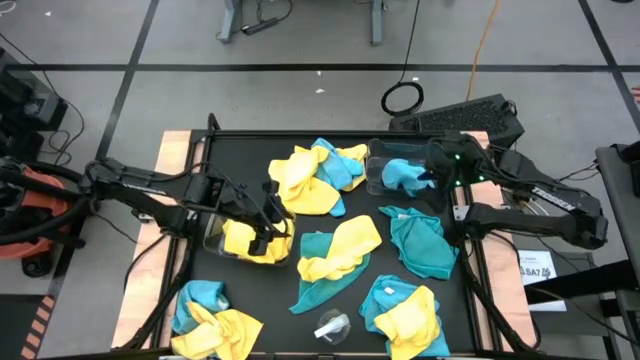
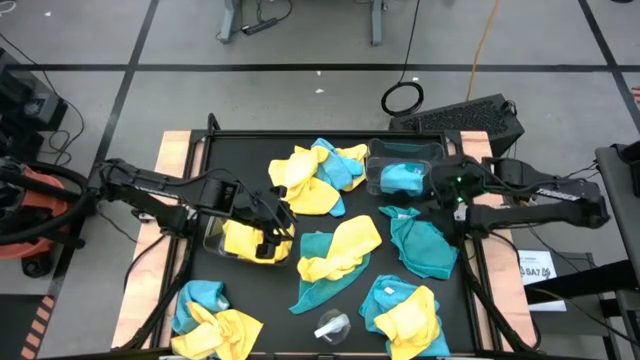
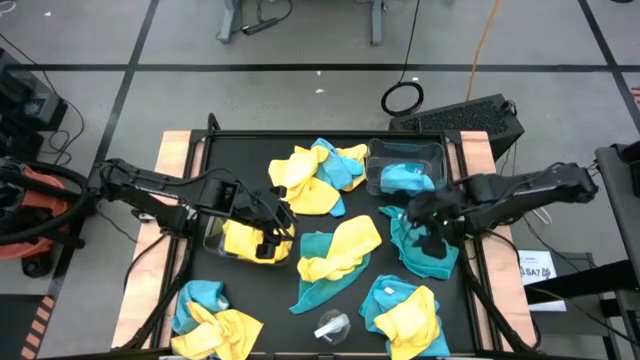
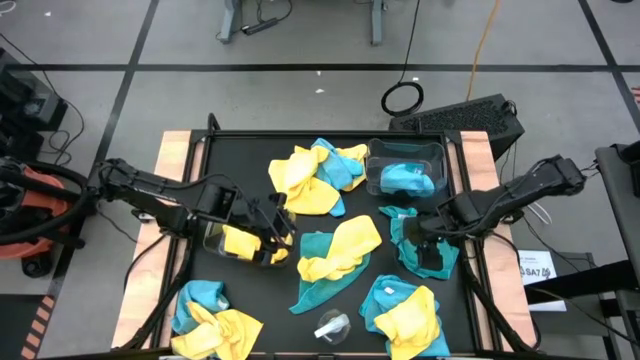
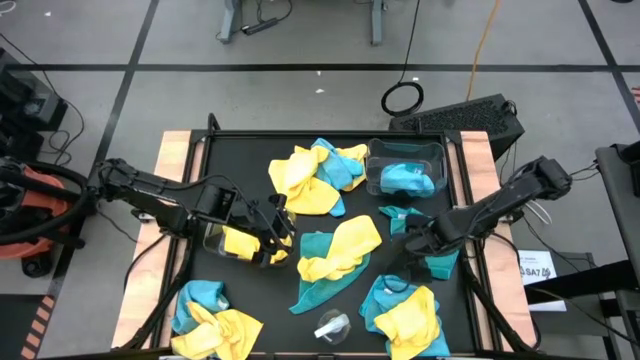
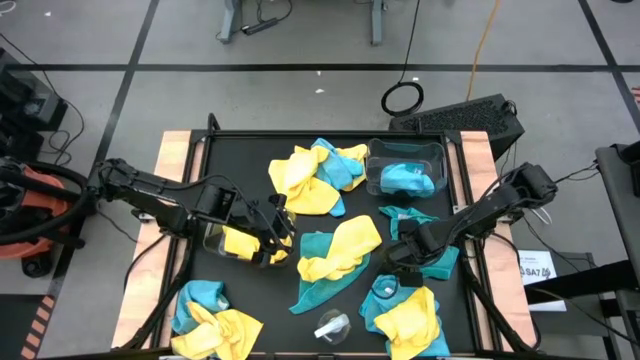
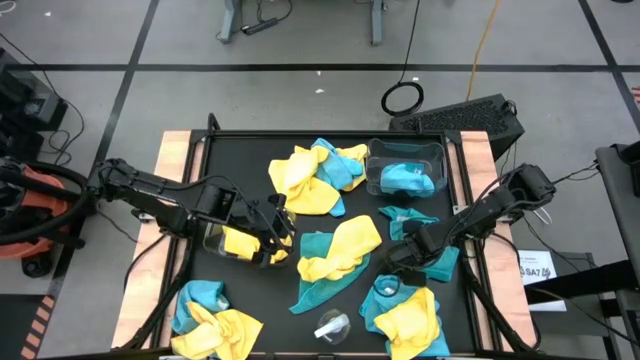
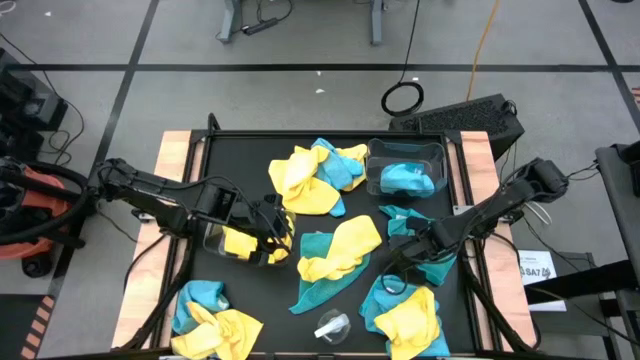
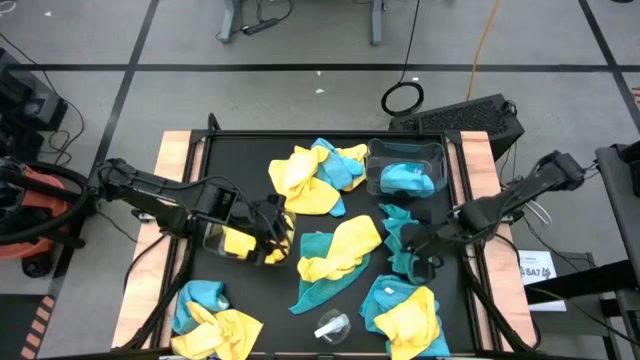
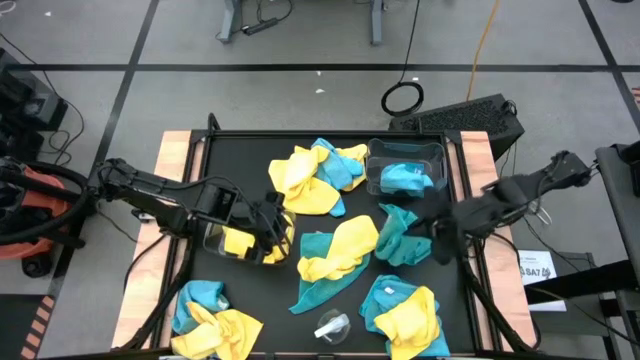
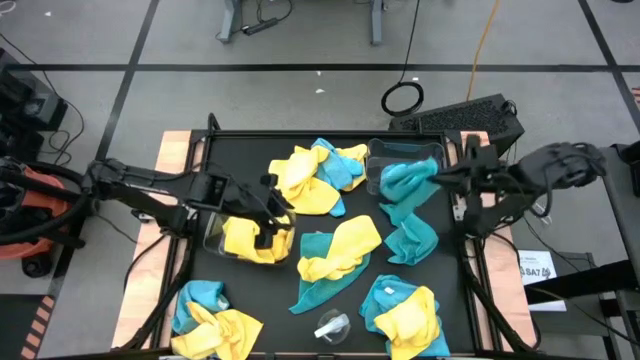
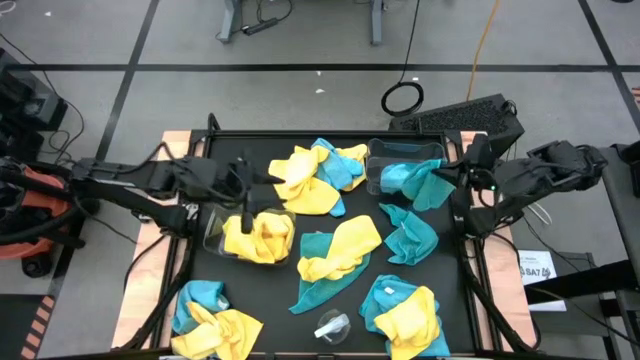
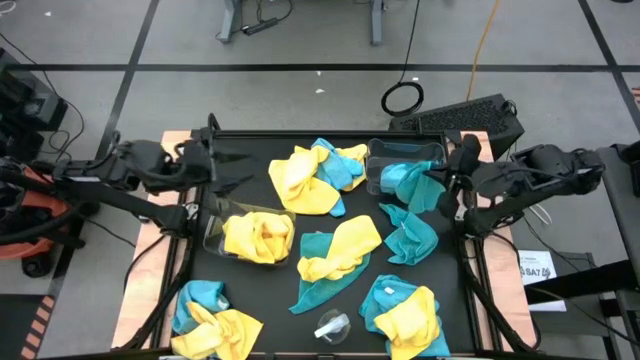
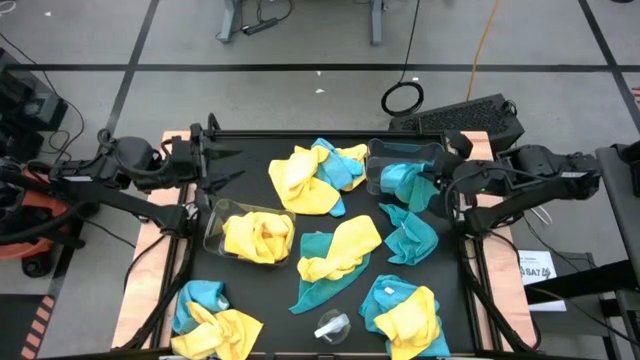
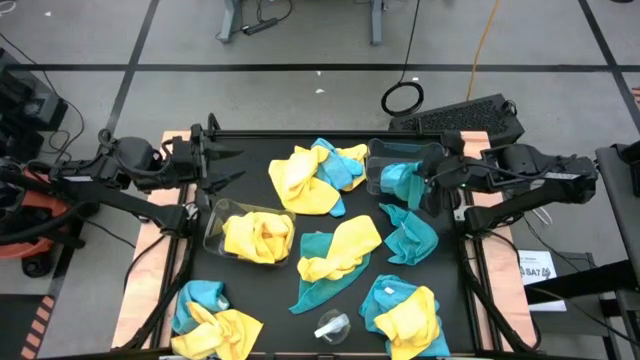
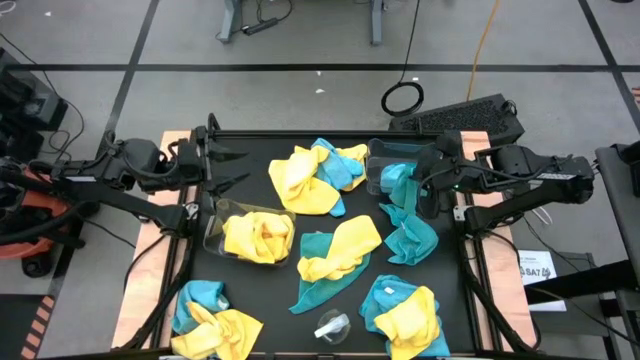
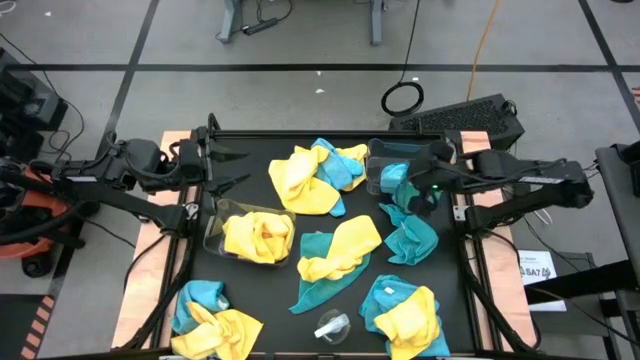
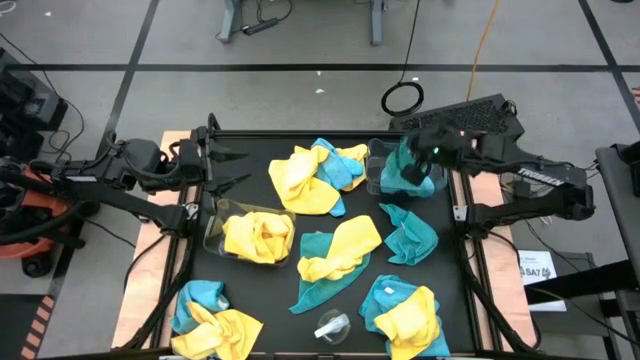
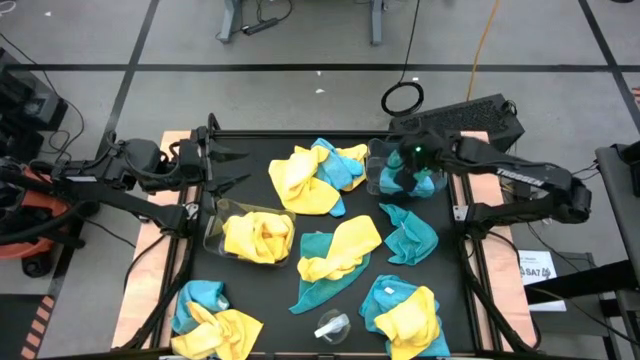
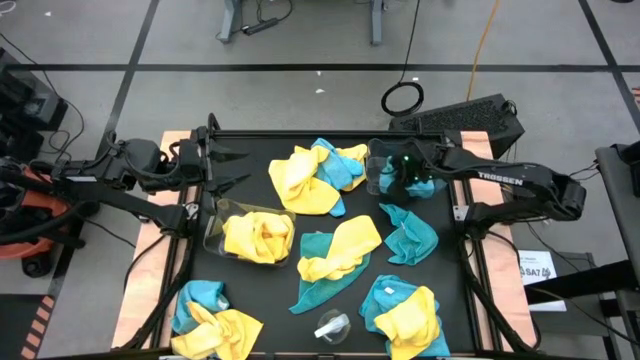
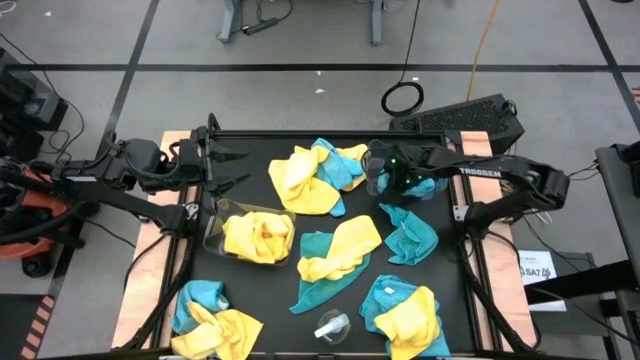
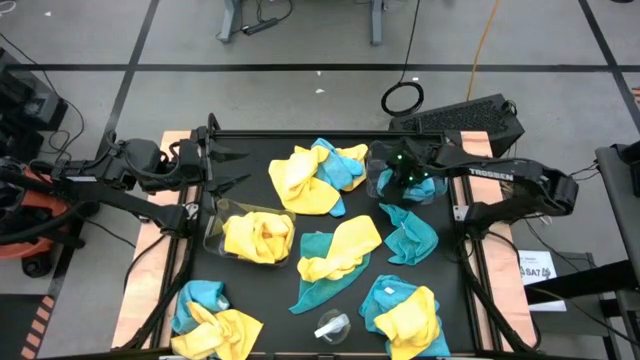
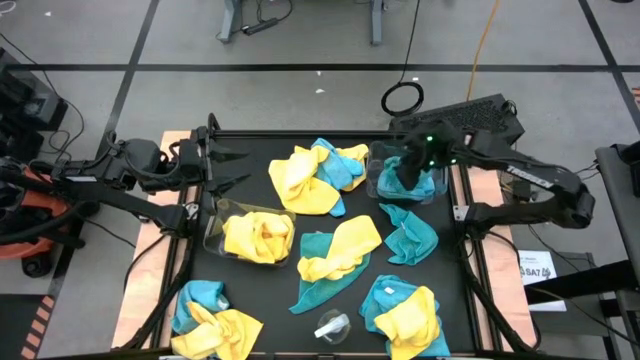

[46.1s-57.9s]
Task: Sort microfiber towel by color & place in baskets
Put the blue microfiber towel into the top transparent bin

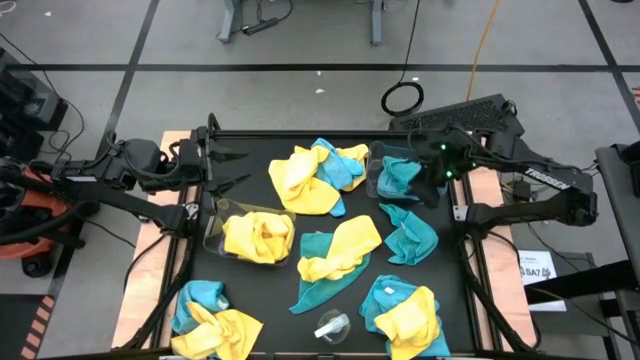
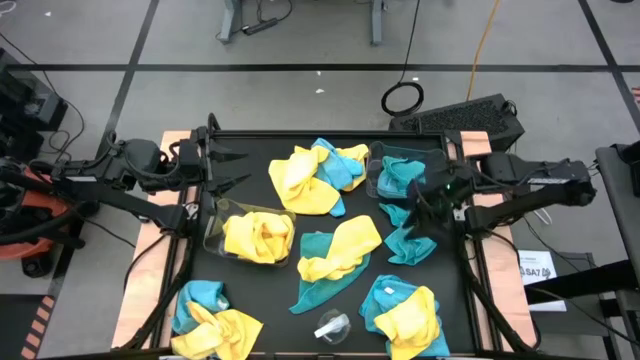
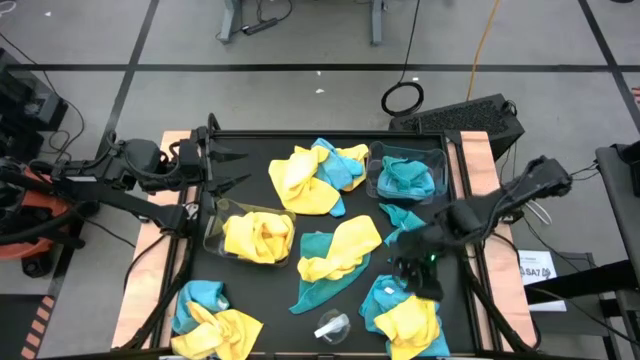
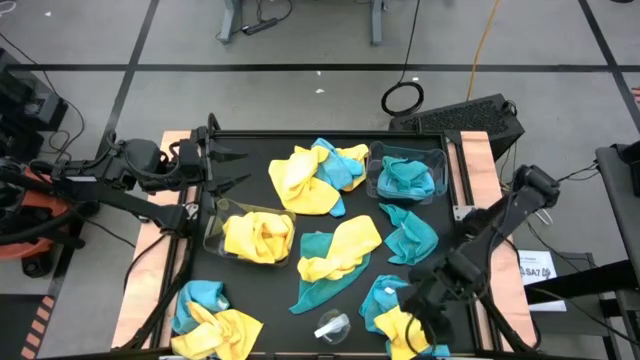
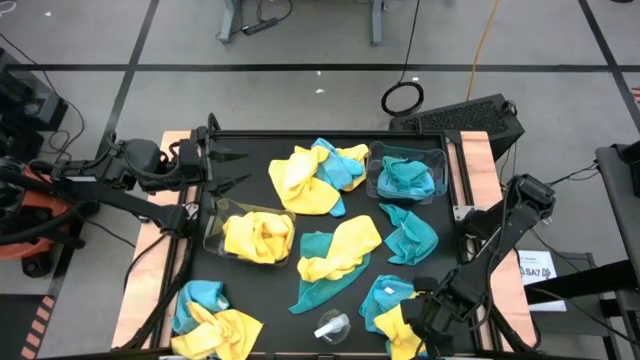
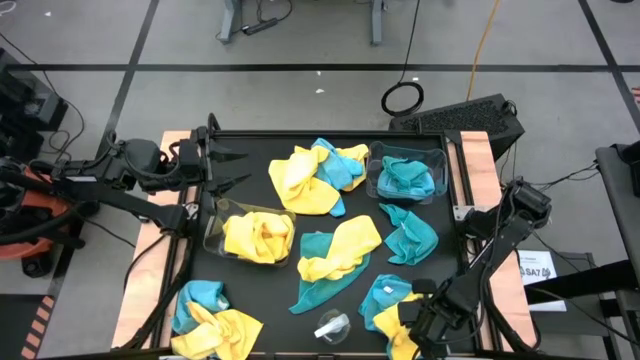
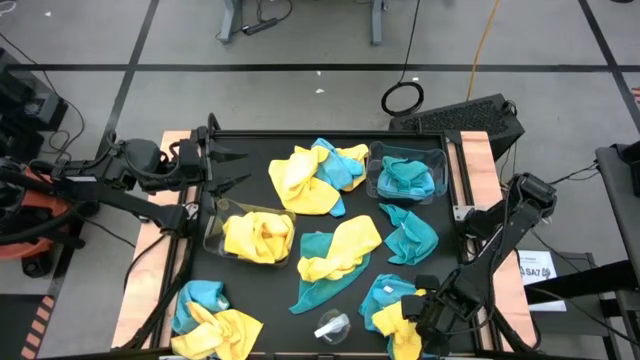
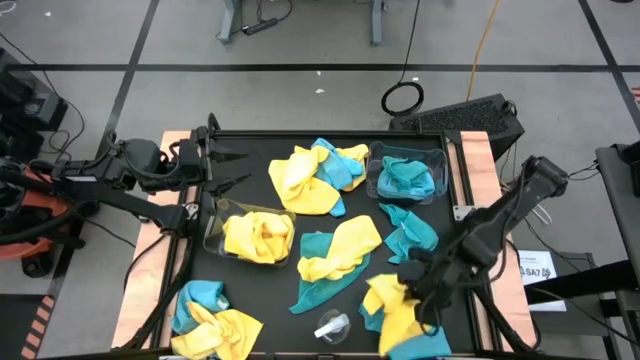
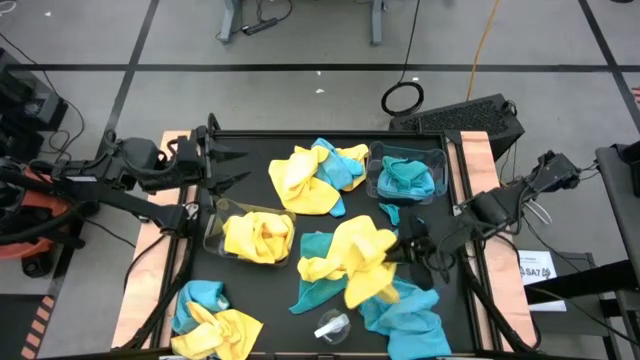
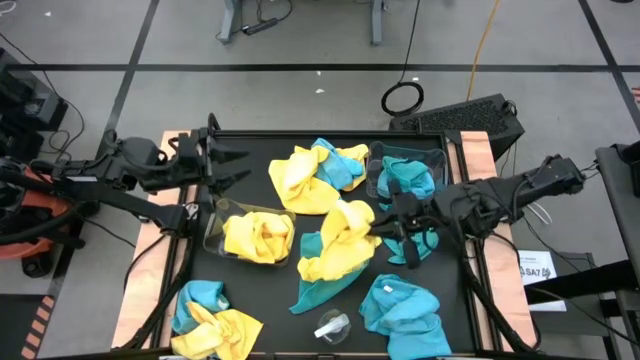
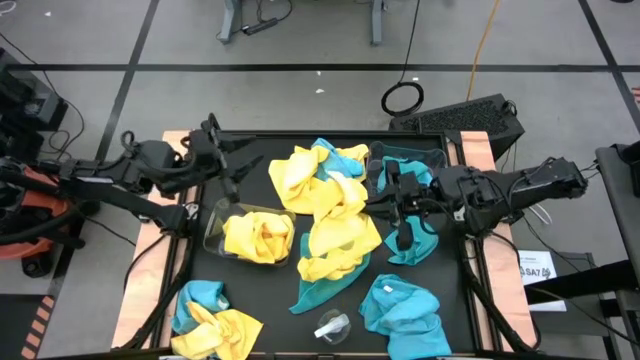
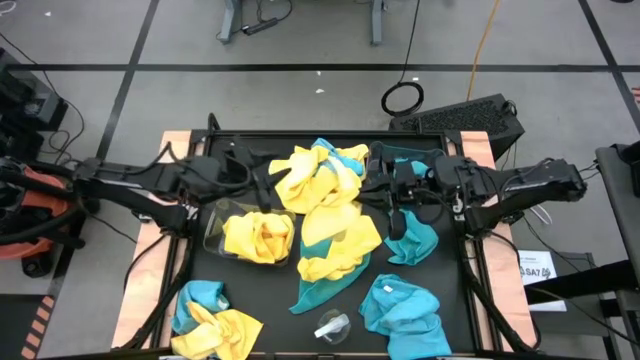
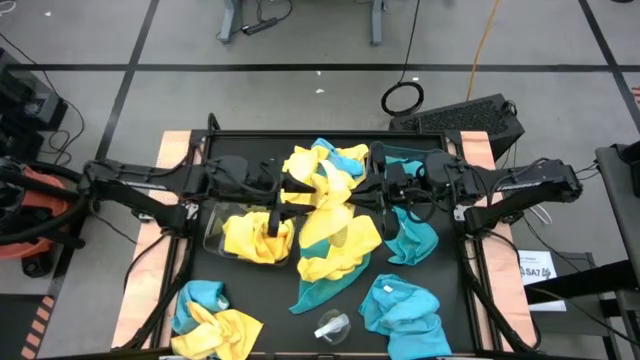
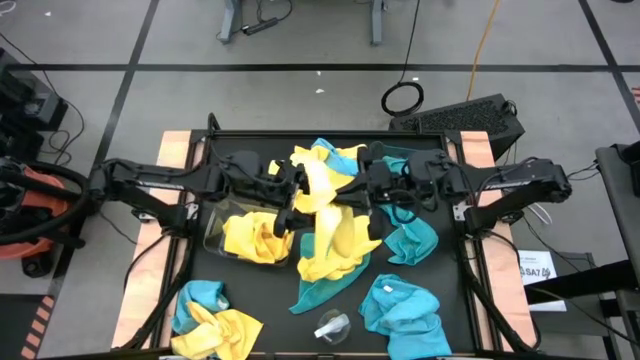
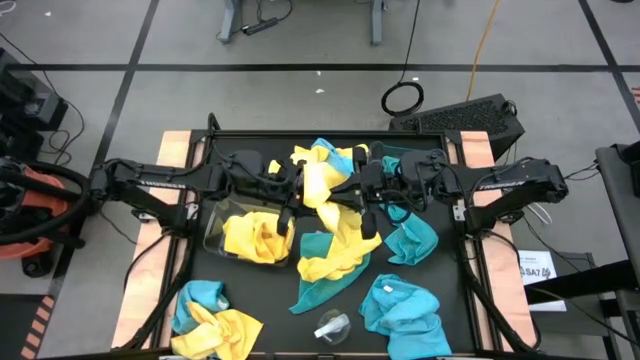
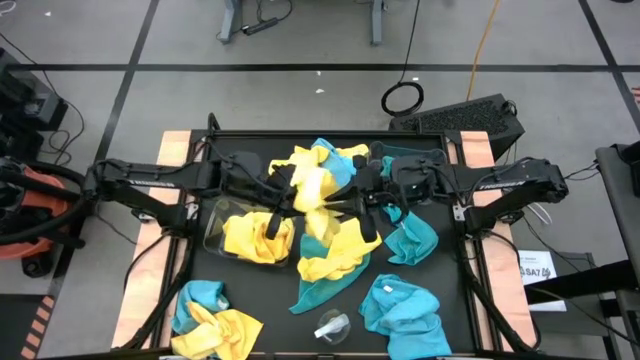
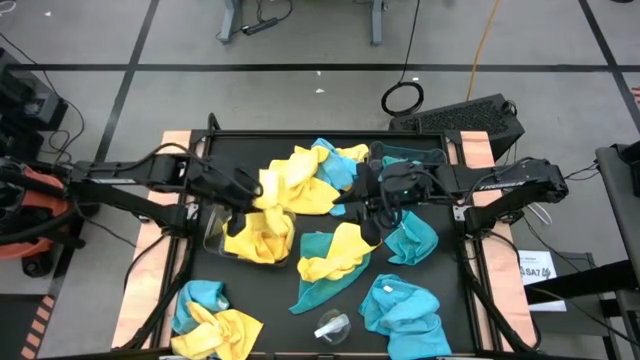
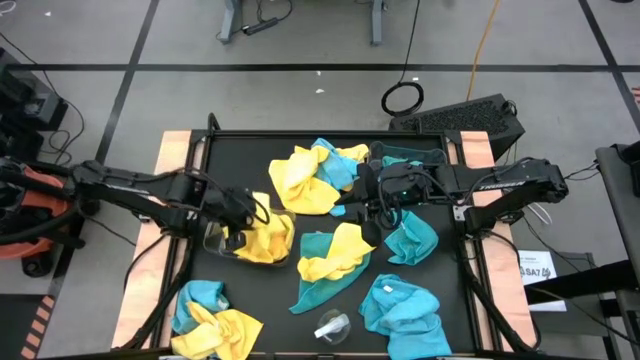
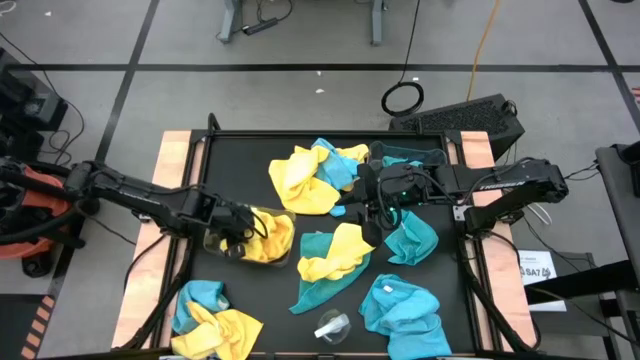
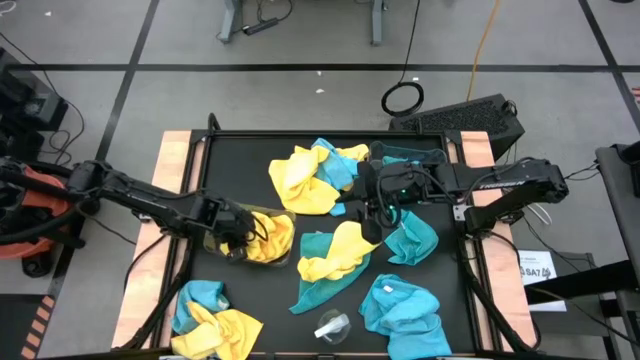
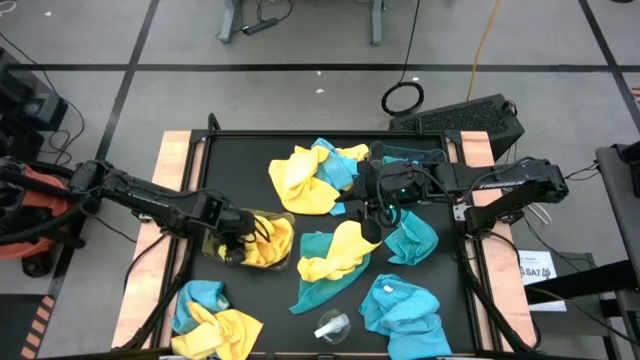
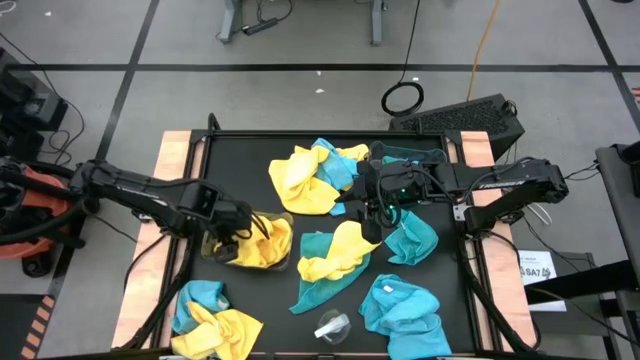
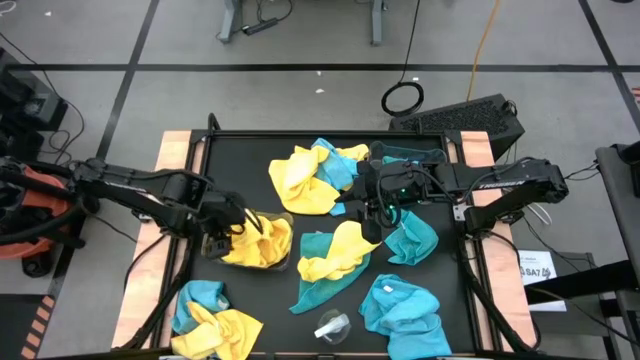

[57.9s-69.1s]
Put the yellow microfiber towel into the bottom transparent bin
